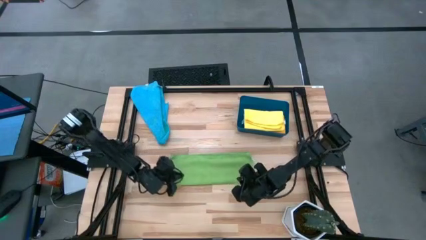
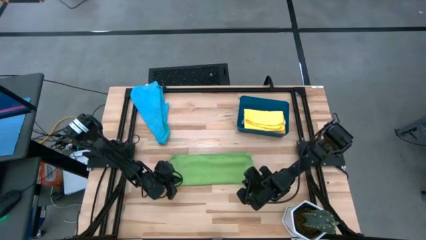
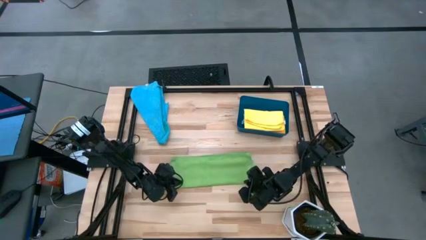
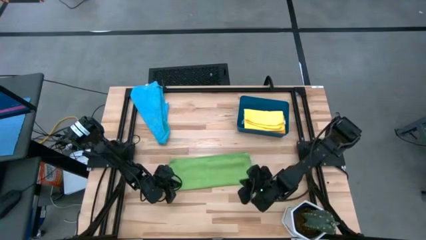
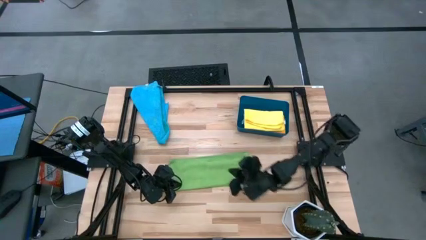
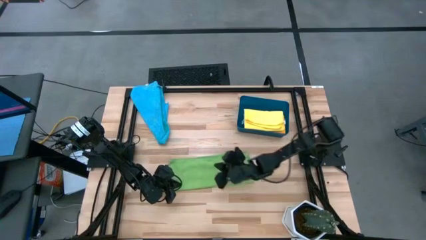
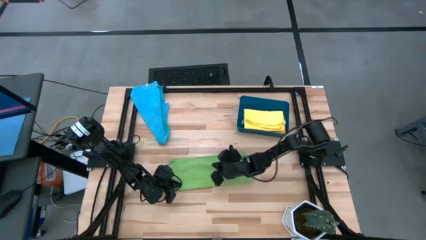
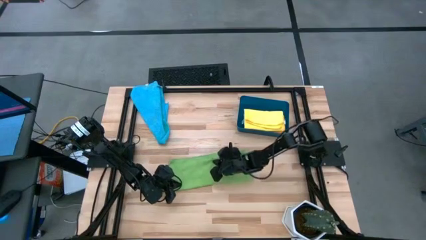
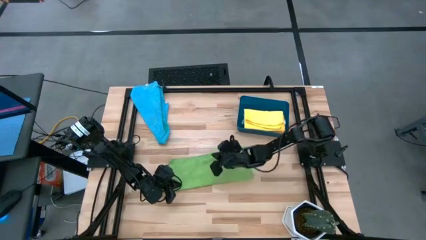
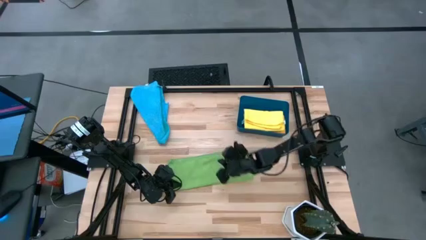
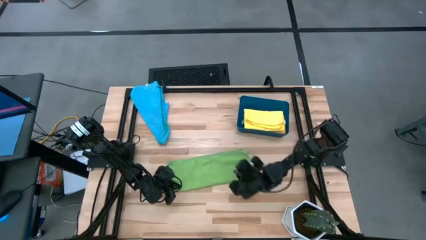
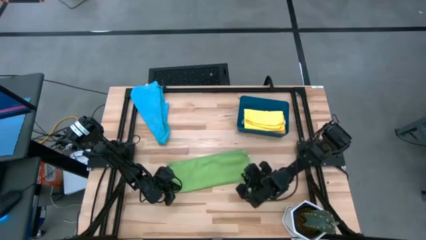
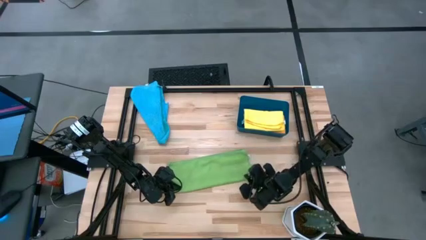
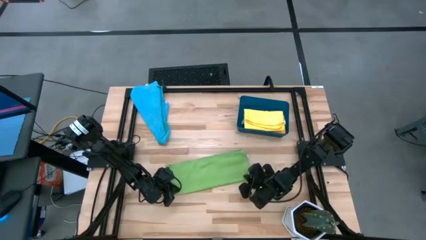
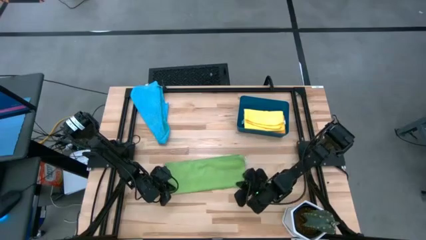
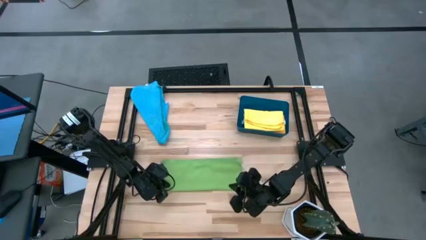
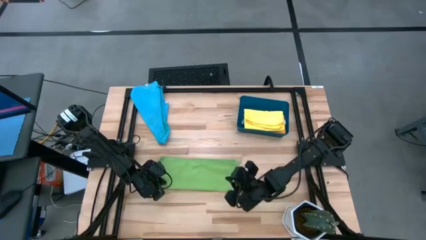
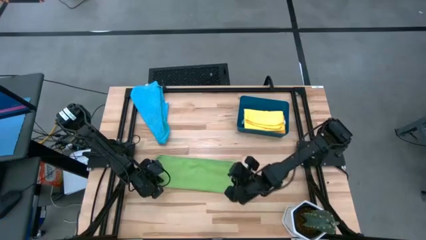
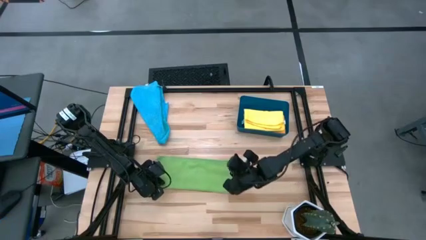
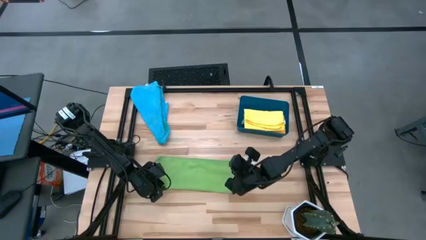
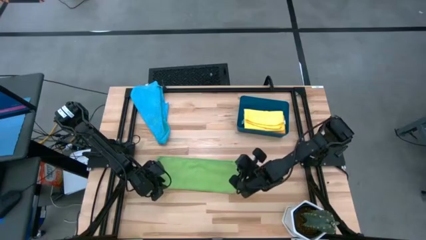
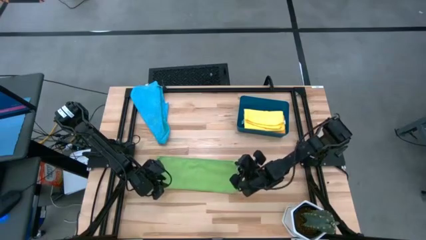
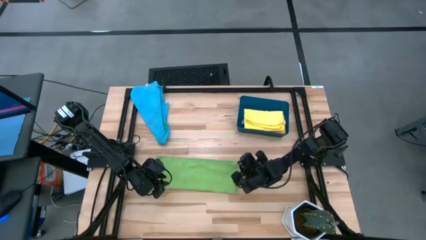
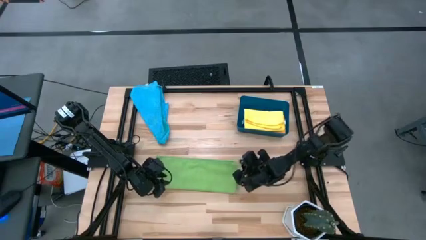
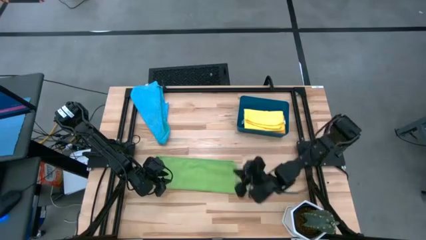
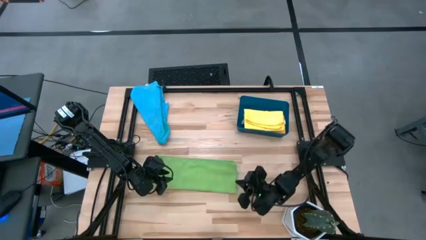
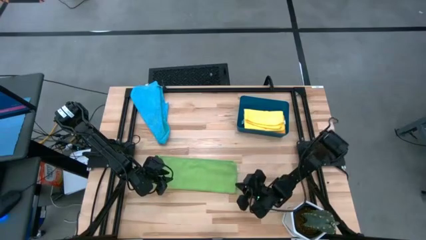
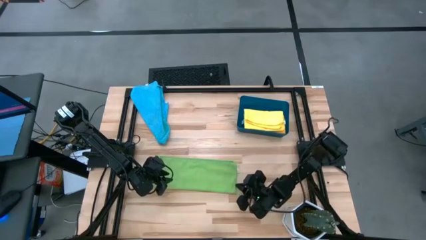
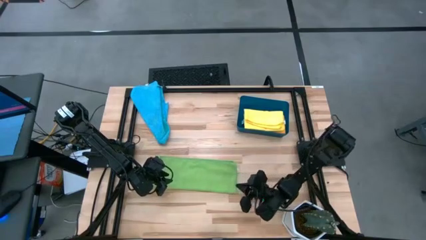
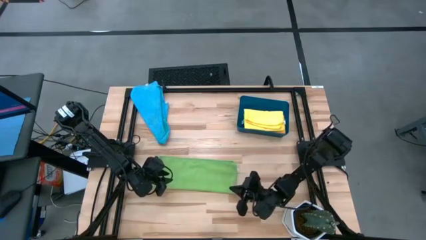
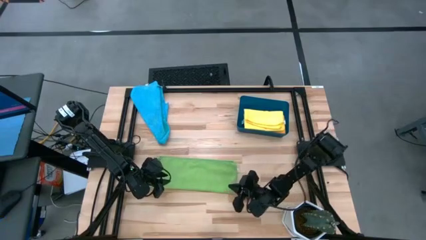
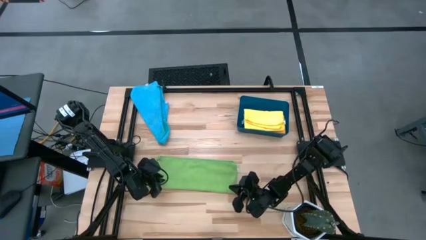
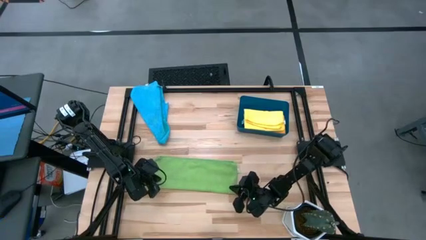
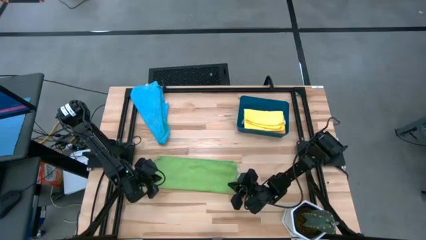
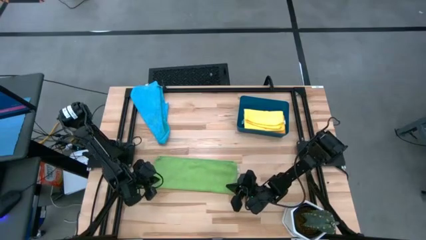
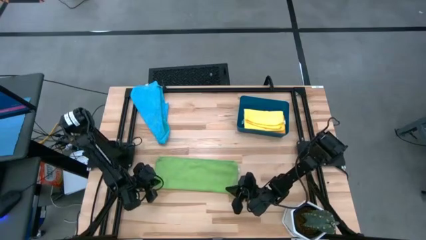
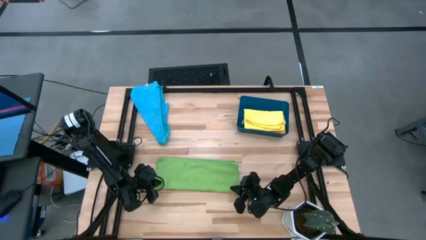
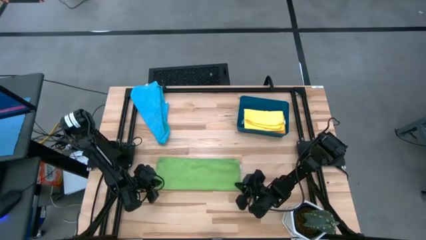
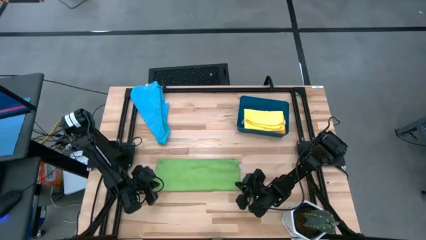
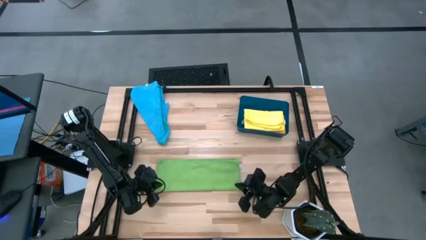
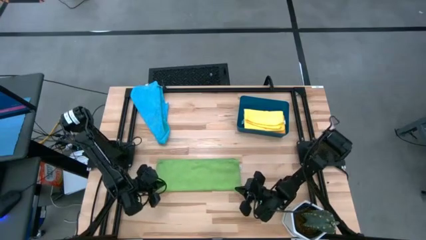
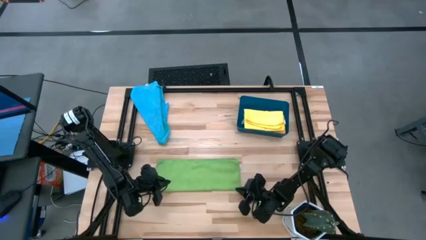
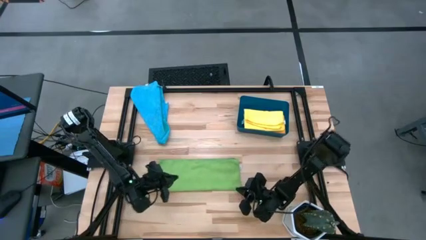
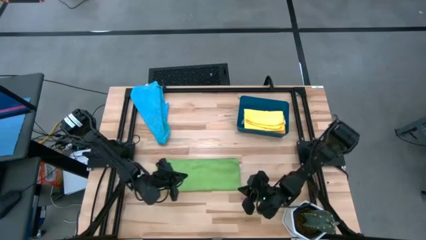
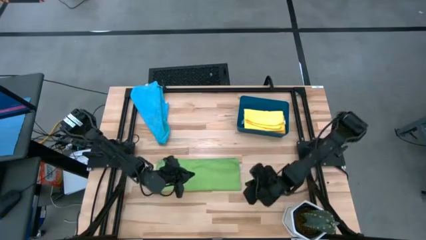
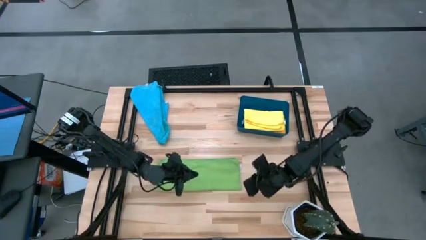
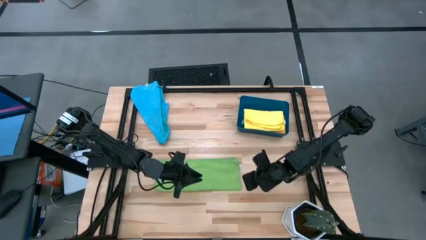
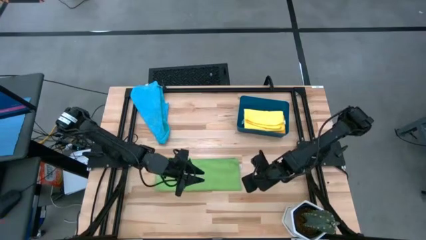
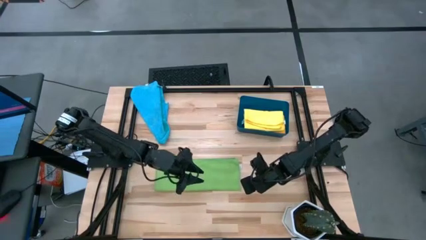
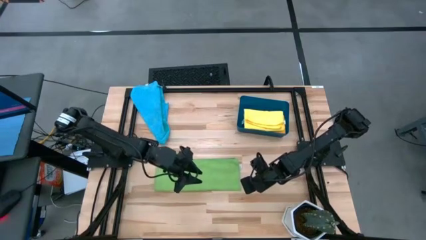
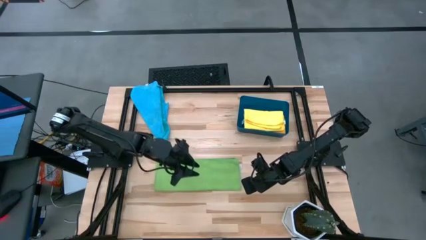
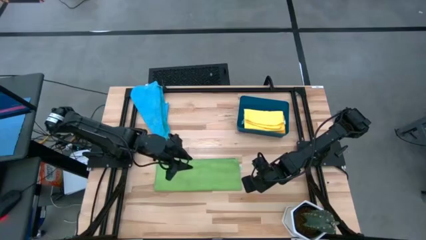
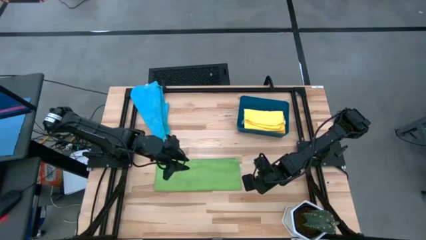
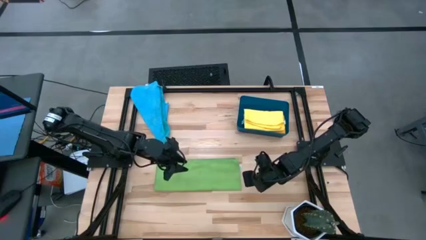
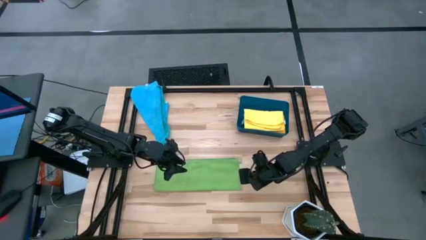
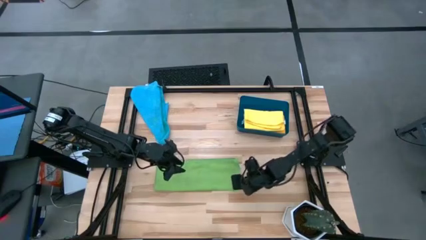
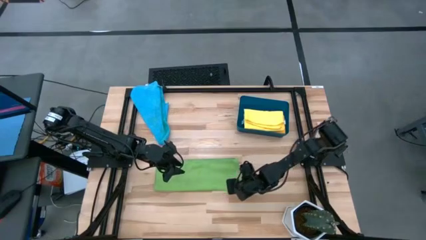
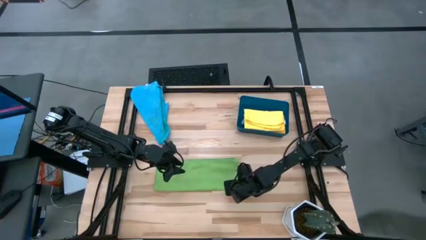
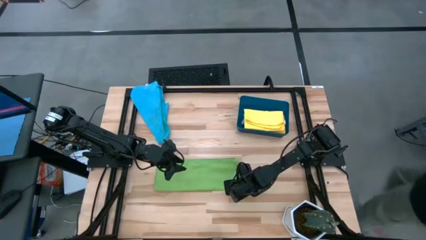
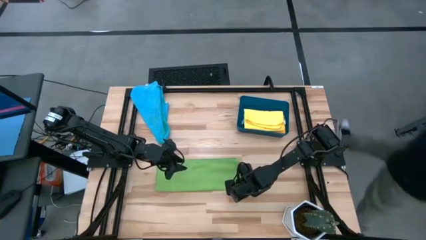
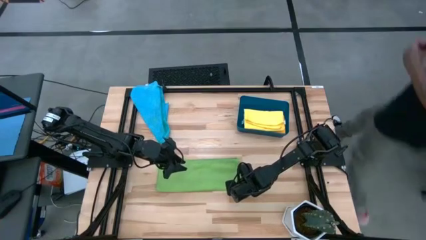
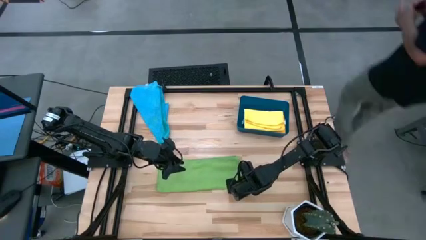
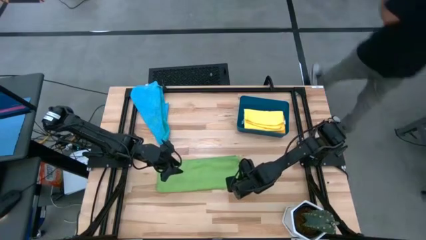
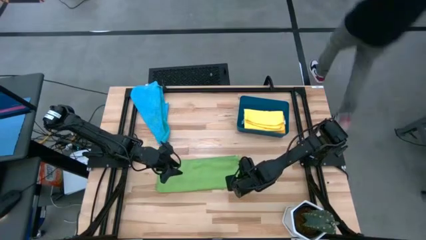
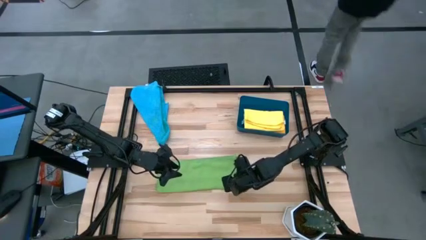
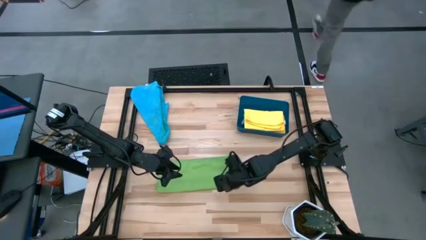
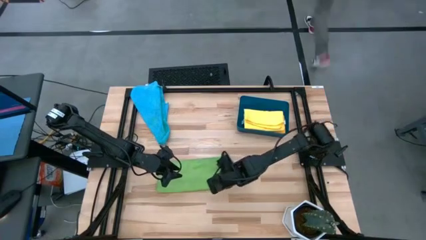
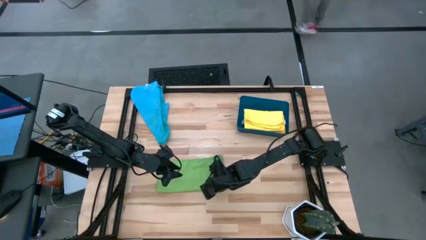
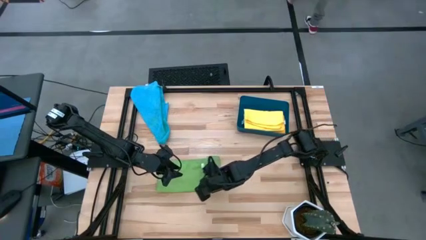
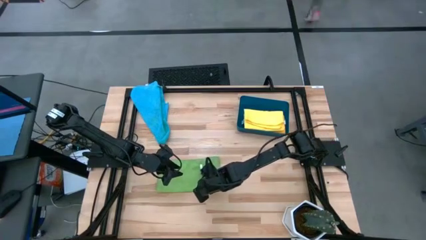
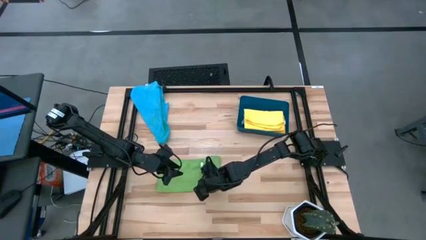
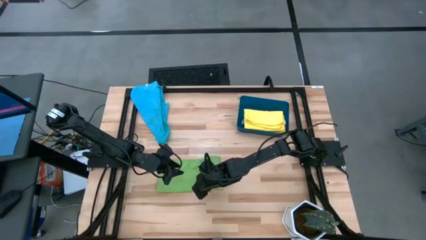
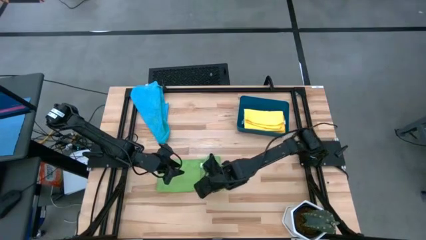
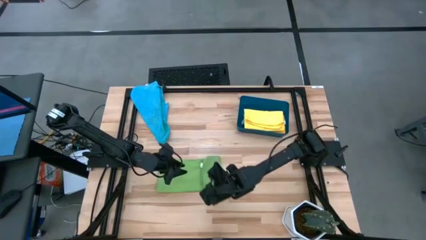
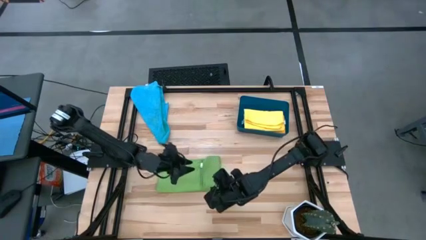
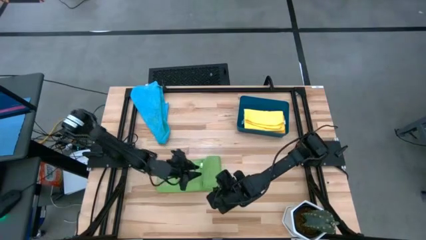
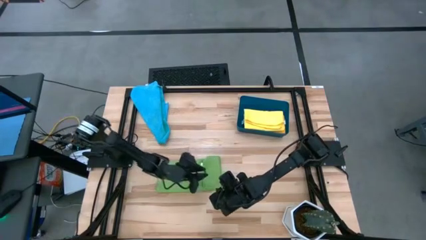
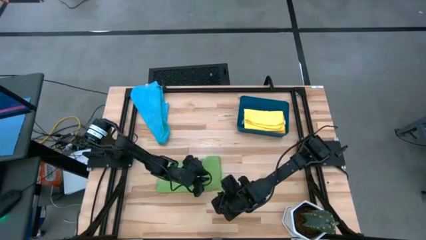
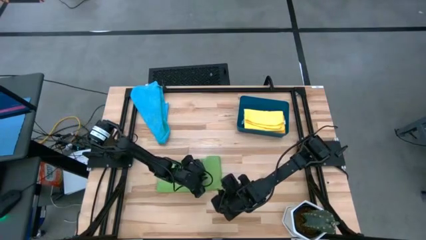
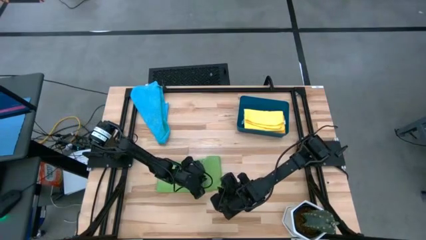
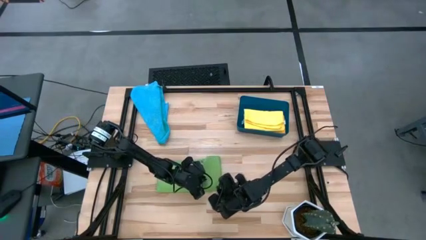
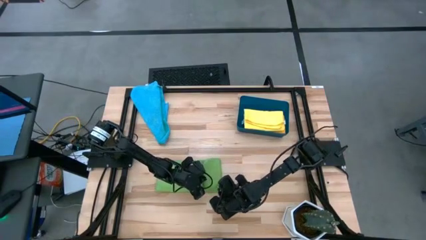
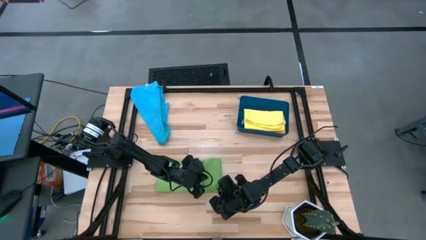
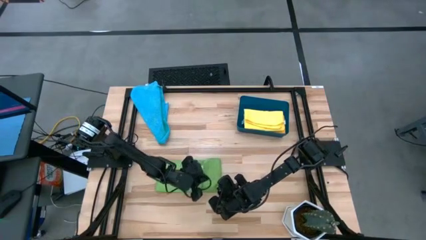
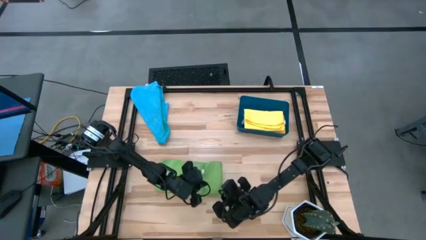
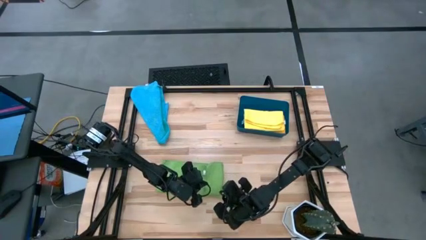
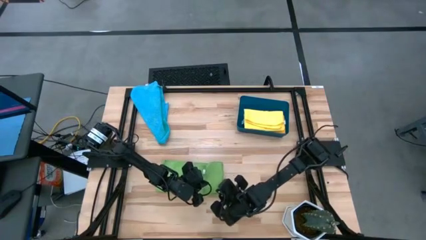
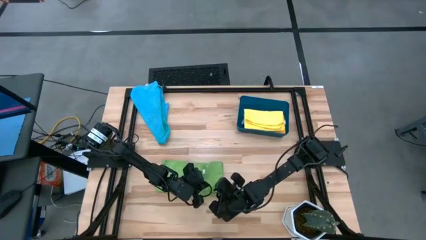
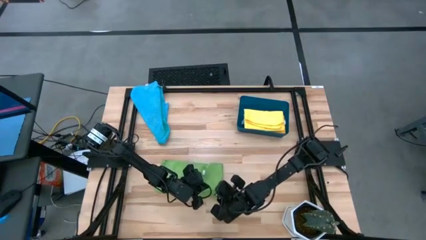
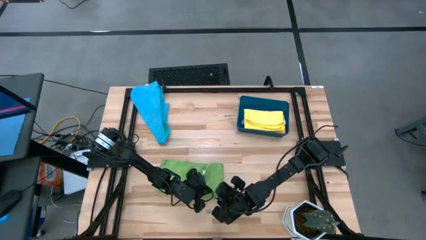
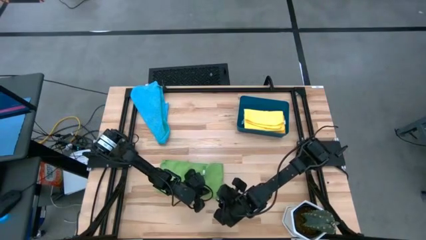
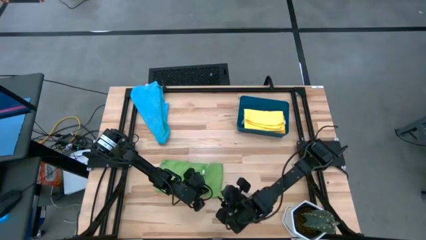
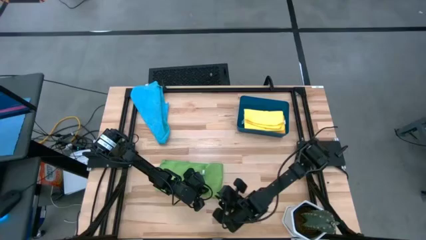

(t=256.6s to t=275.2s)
Task: Fold microfiber towels
Fold the green microfiber cloth
